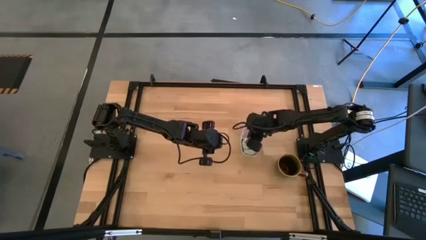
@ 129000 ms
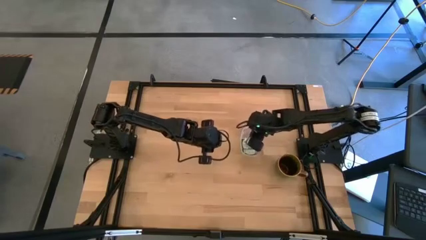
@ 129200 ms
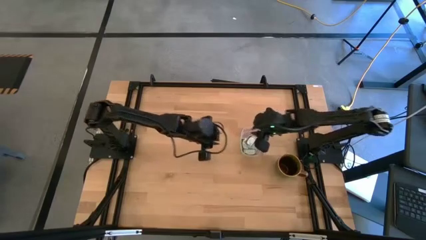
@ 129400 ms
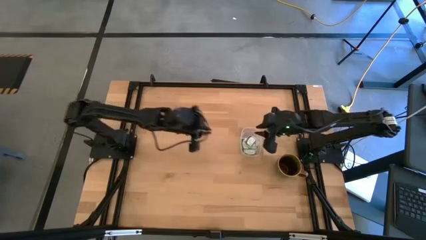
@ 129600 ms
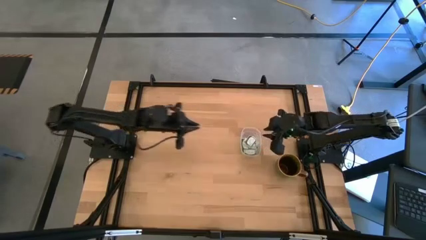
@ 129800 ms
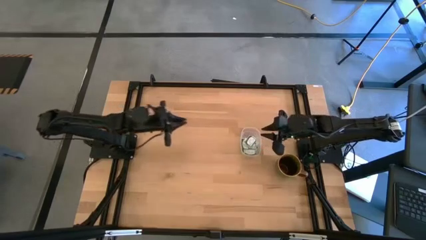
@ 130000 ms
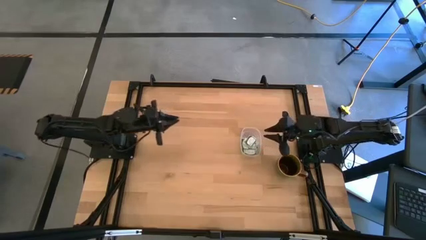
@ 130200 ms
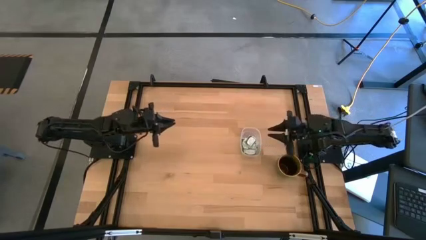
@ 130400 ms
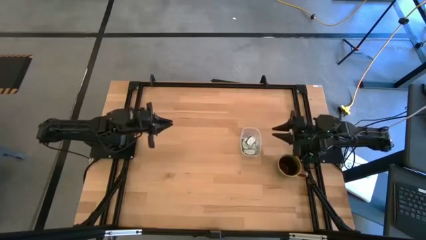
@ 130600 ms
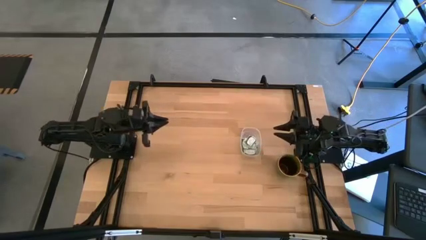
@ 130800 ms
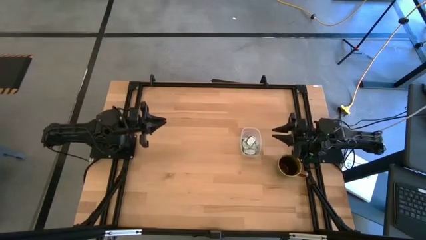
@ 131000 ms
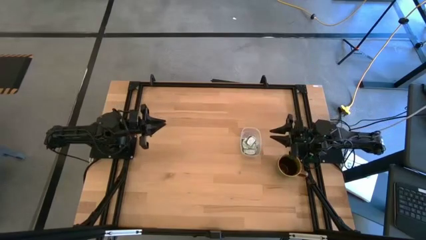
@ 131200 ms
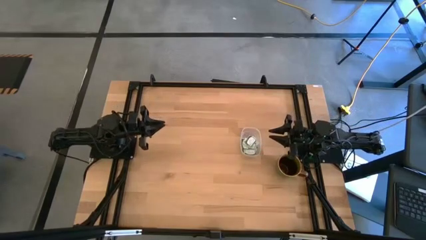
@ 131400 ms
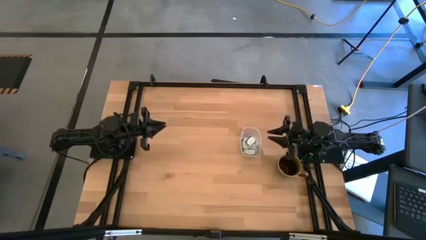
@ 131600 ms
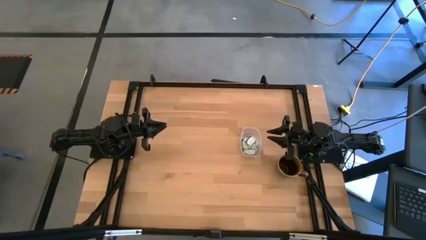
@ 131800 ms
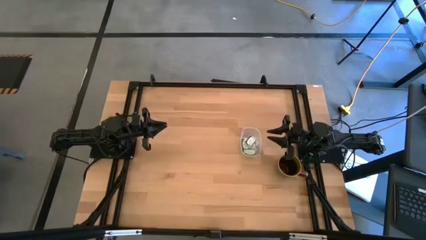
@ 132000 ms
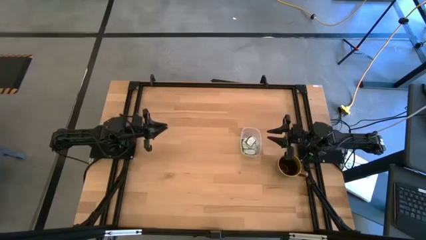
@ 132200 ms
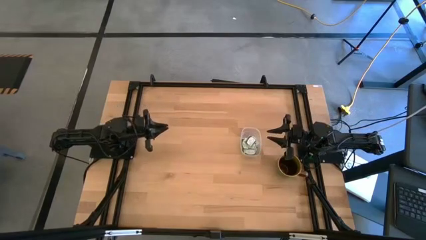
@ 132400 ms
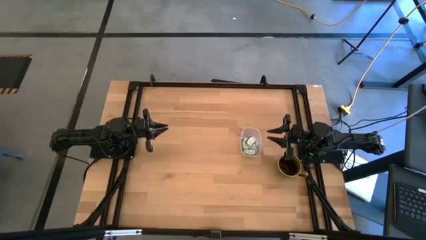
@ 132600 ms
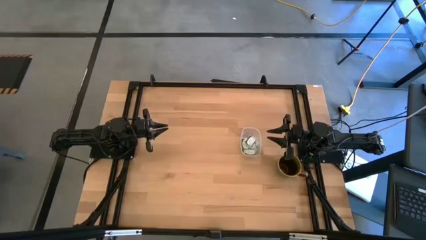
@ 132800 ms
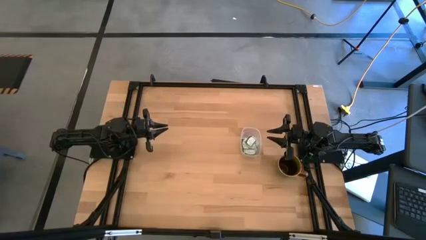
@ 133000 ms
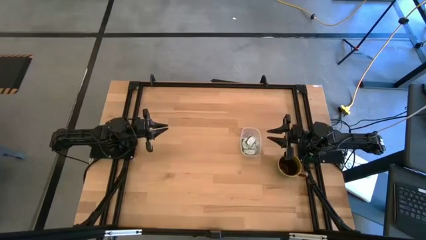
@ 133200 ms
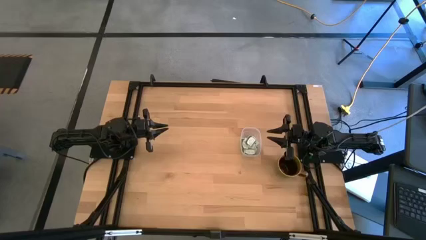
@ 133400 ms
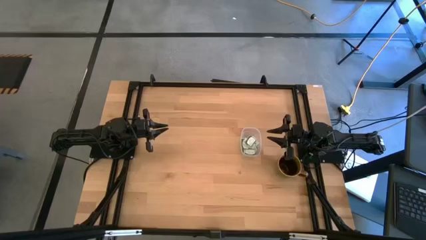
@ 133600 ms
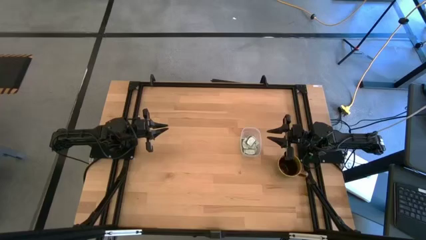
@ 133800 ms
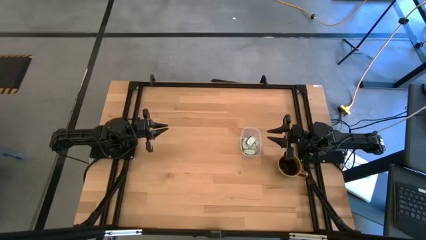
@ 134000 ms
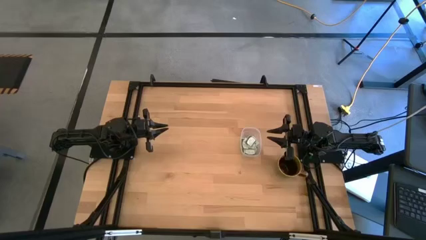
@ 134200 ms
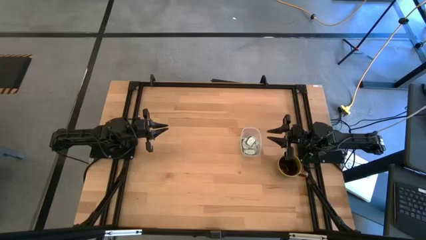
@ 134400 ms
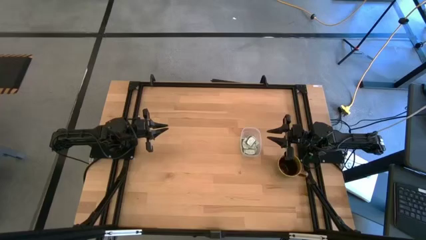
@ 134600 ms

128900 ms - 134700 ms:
Task: Pick and place items into bin
Return to Home Position

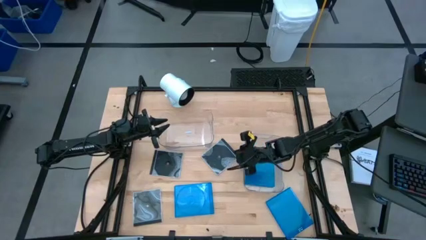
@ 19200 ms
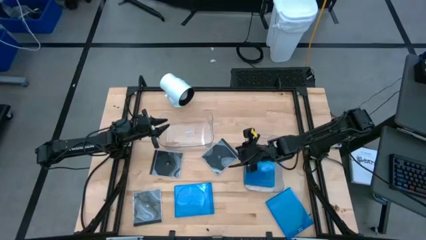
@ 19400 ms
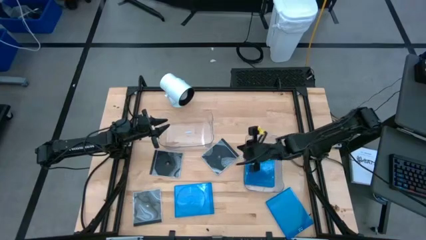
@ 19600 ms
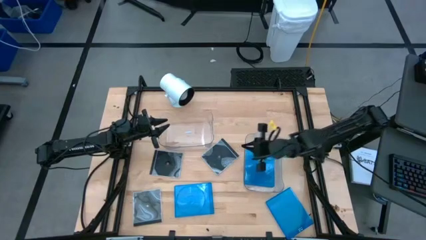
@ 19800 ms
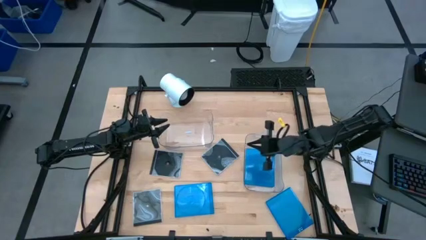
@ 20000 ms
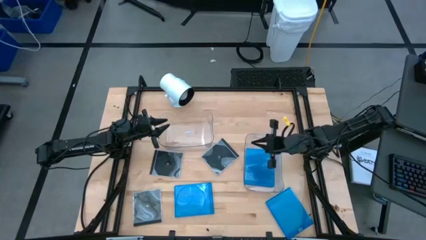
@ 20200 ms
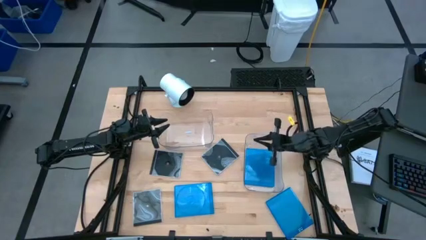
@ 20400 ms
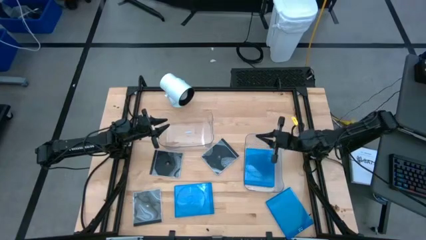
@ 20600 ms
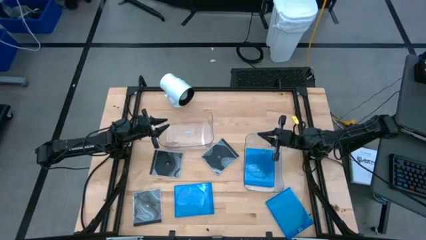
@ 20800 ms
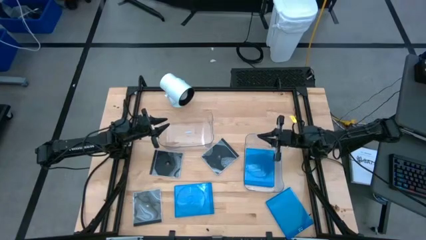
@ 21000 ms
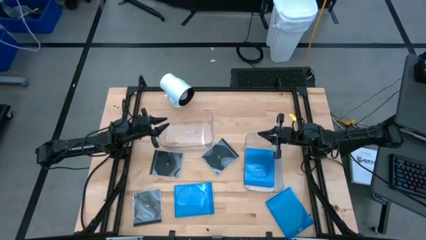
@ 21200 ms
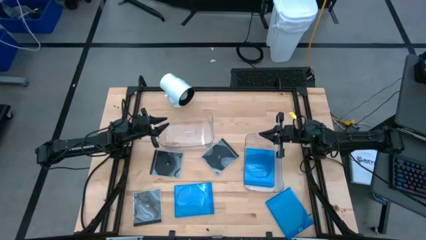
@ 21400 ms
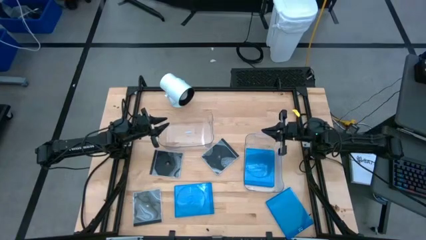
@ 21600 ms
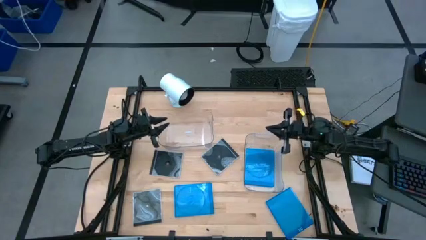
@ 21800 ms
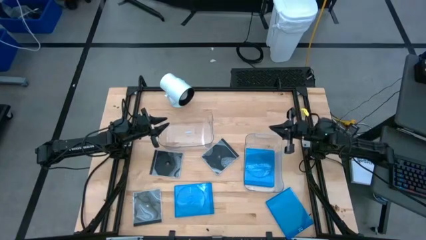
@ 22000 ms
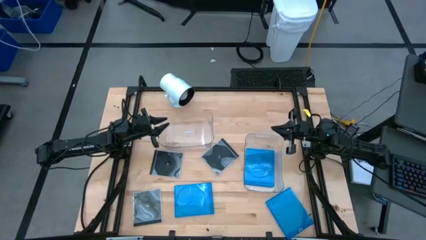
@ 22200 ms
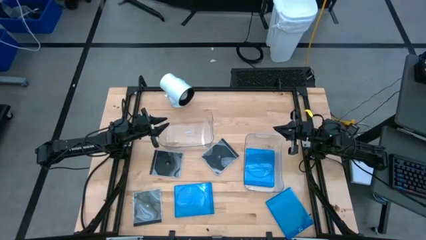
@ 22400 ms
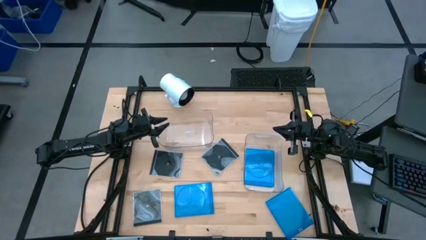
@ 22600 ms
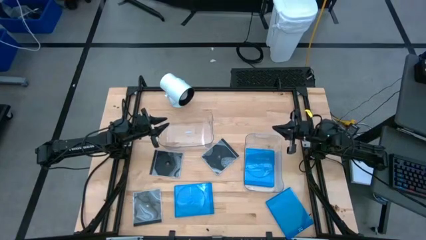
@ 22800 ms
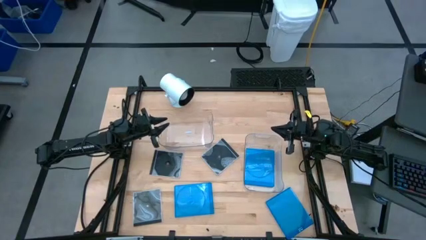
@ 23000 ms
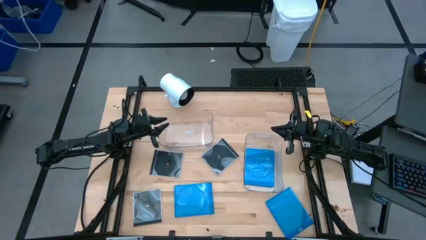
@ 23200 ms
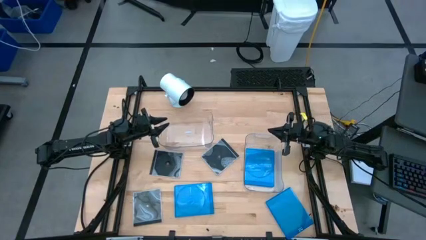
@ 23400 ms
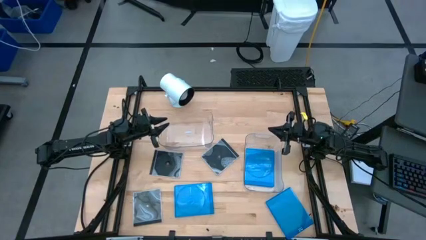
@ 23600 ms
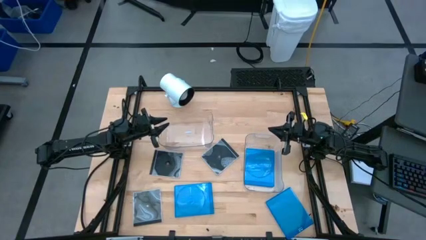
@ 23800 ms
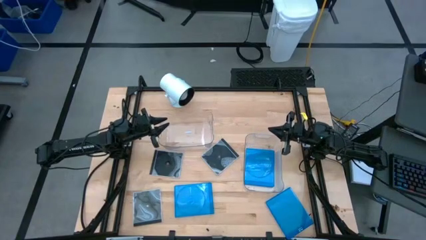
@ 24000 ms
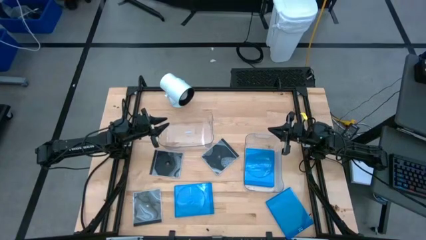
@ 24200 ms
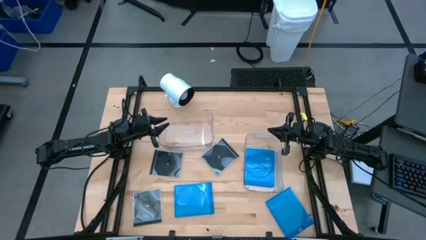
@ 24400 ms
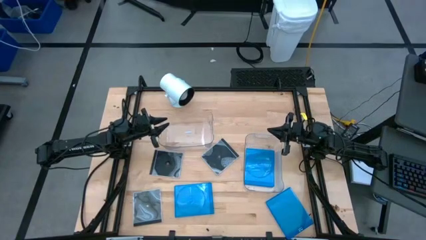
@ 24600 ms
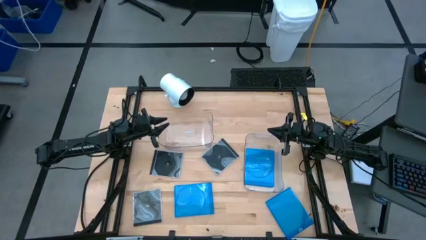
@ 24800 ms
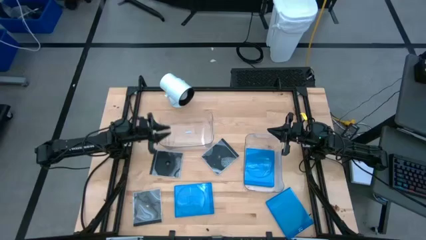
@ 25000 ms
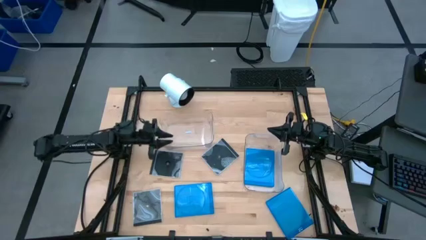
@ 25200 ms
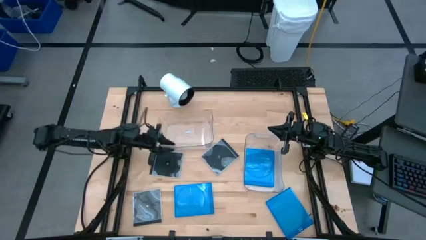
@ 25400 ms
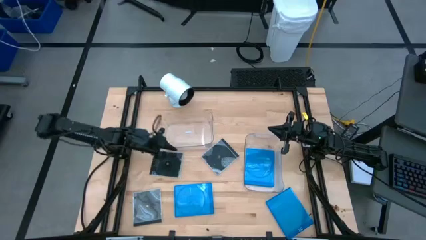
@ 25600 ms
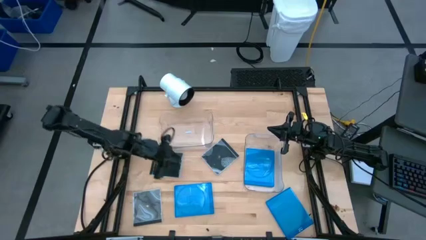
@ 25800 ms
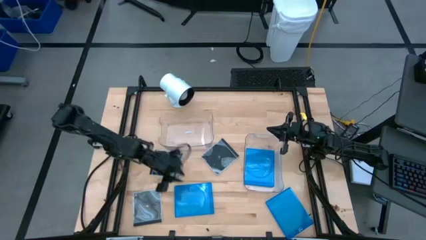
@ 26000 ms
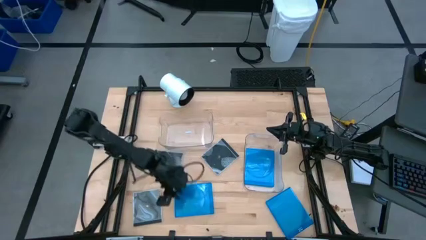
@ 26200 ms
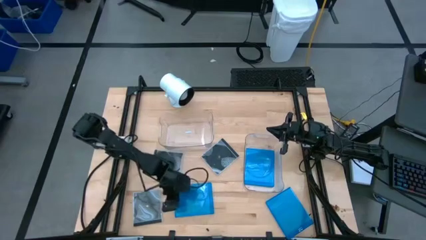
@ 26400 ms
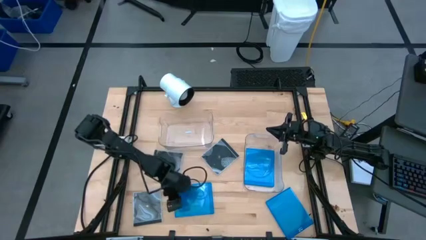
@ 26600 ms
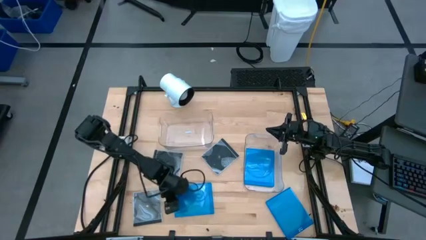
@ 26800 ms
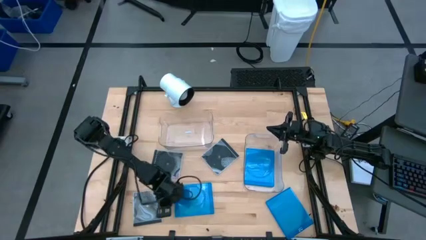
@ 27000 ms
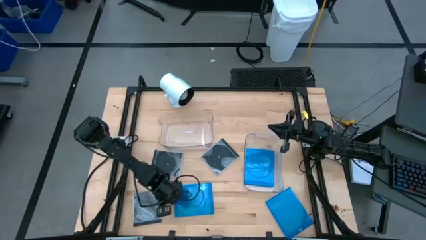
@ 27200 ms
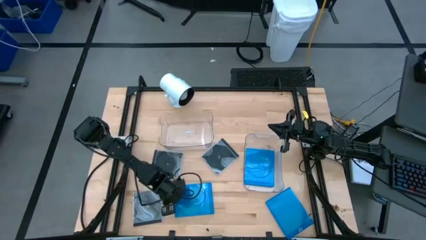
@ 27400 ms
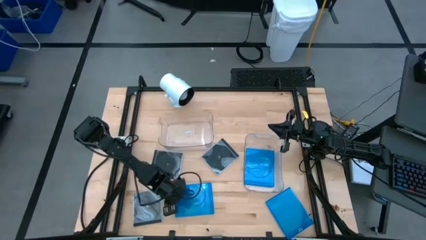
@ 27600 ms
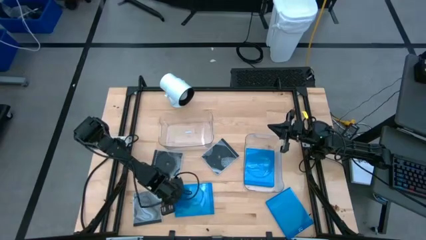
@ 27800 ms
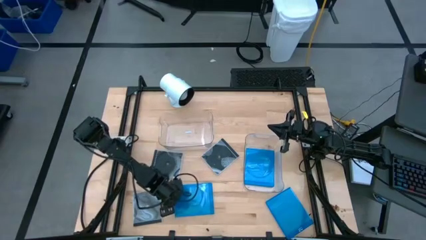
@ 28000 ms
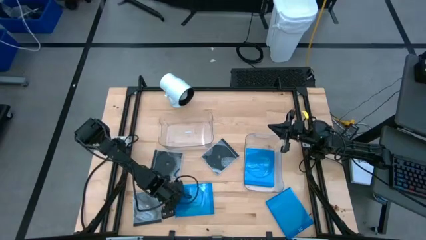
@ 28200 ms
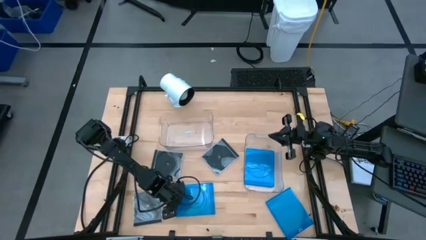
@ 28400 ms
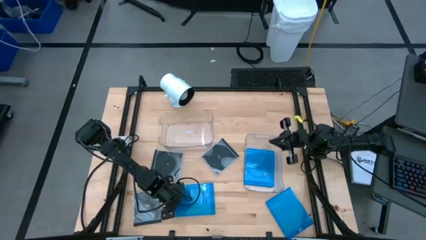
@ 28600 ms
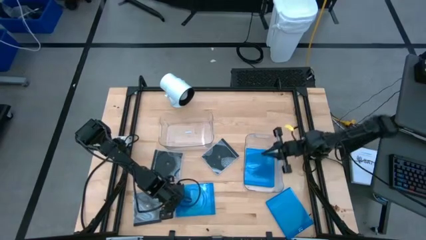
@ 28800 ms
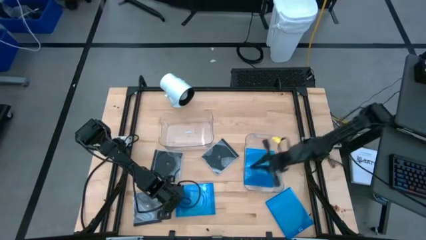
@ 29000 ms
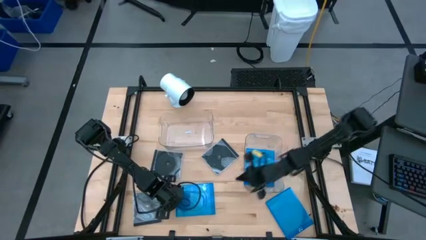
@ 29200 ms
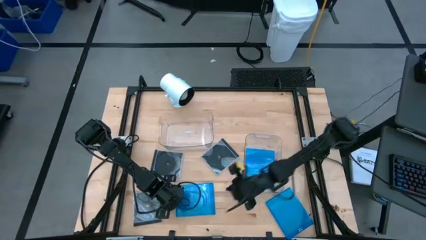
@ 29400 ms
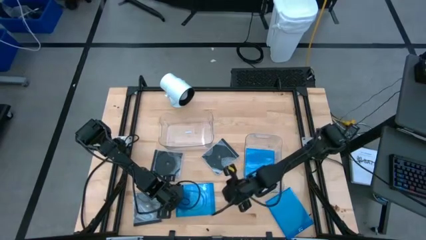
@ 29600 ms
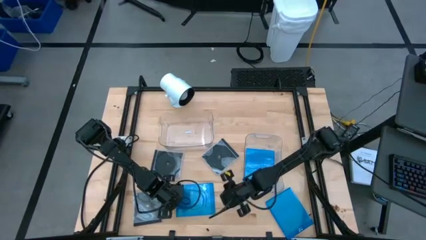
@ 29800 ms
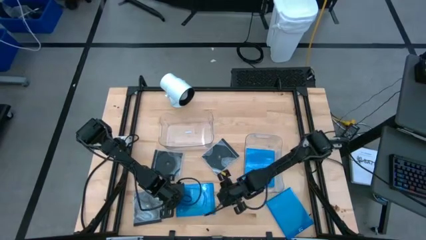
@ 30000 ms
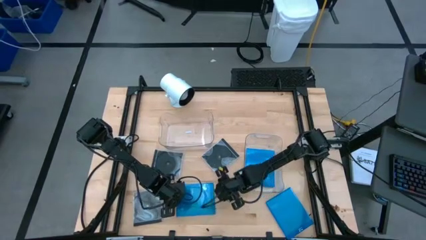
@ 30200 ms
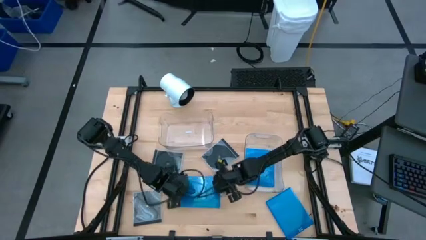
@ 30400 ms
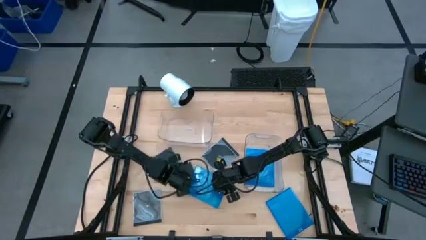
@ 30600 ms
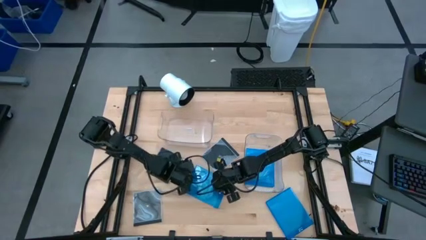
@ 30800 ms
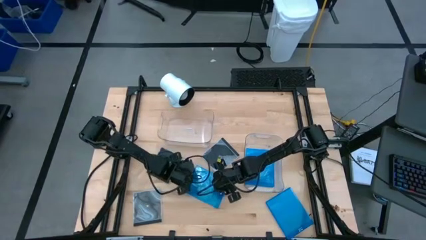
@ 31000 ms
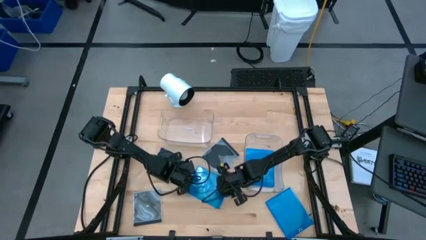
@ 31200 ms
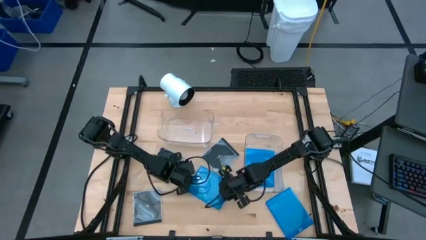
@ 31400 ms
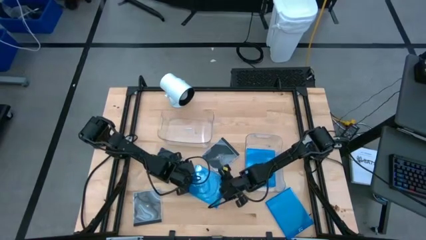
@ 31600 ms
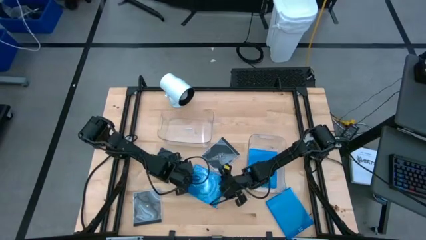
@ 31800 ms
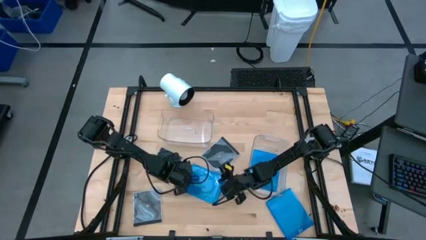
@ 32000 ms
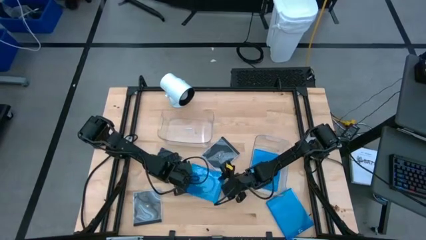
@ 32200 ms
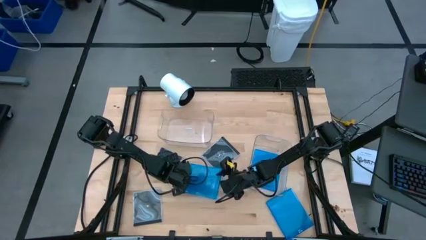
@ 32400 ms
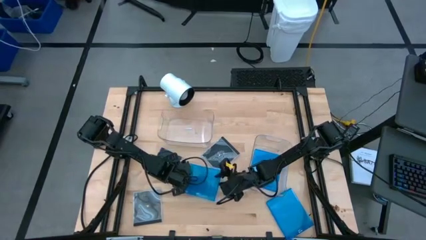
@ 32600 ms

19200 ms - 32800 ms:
Task: Pick & place jewel cases by type
Put the left blue cd case into the right transparent bin
